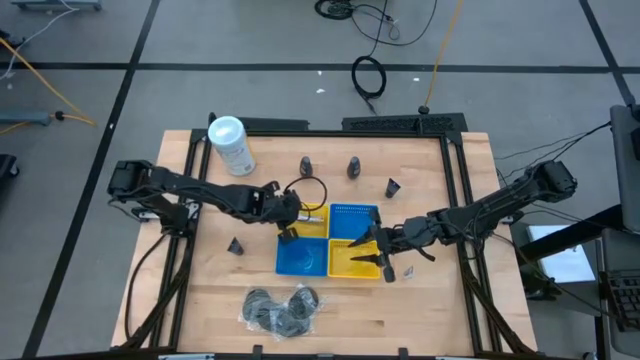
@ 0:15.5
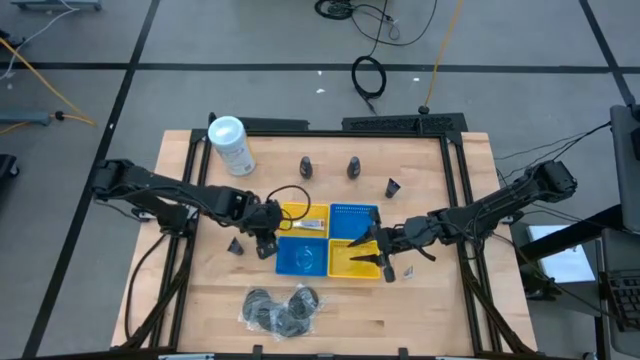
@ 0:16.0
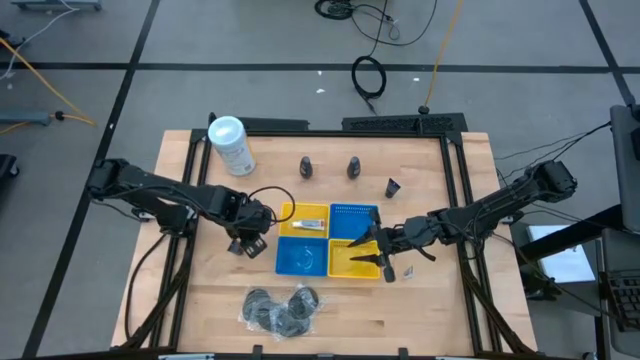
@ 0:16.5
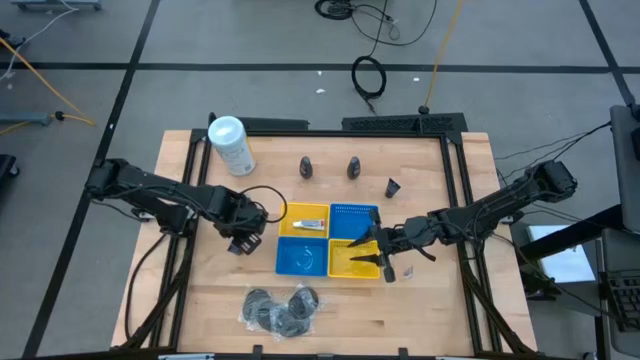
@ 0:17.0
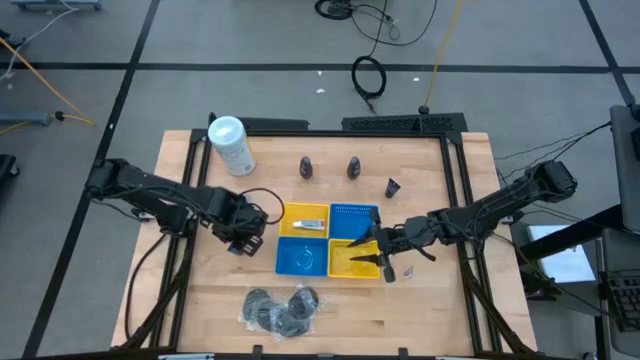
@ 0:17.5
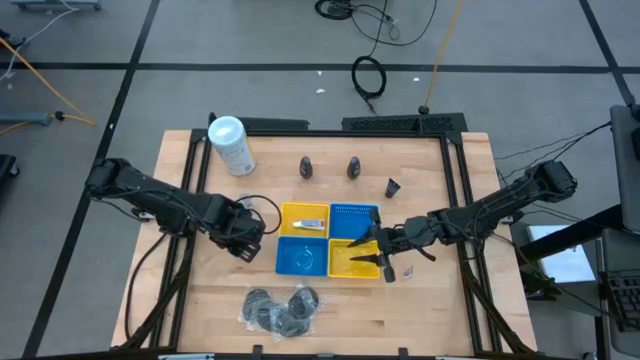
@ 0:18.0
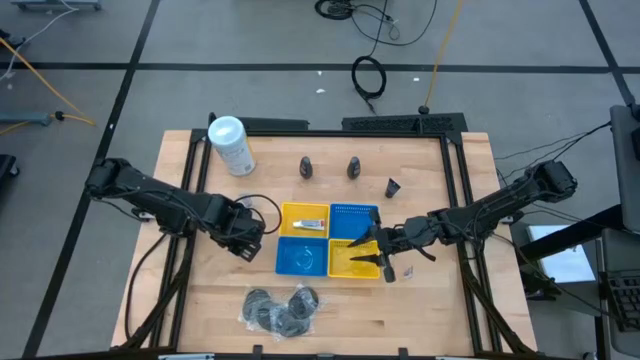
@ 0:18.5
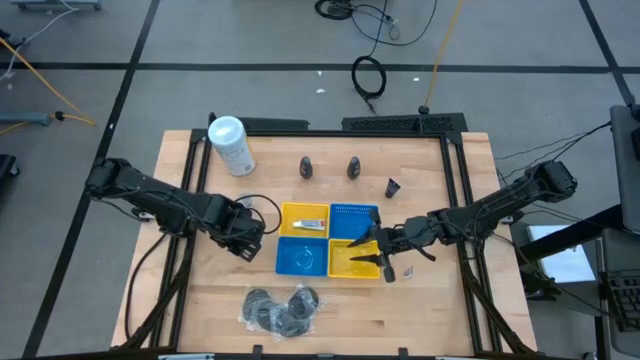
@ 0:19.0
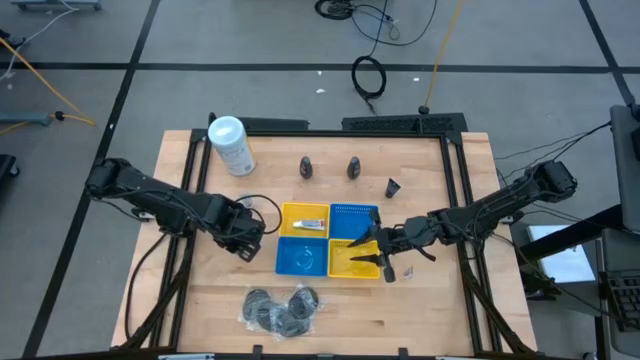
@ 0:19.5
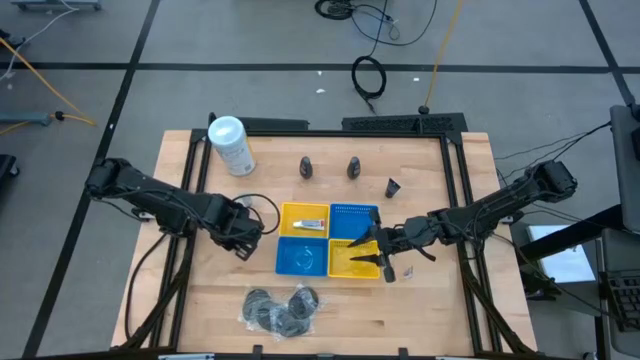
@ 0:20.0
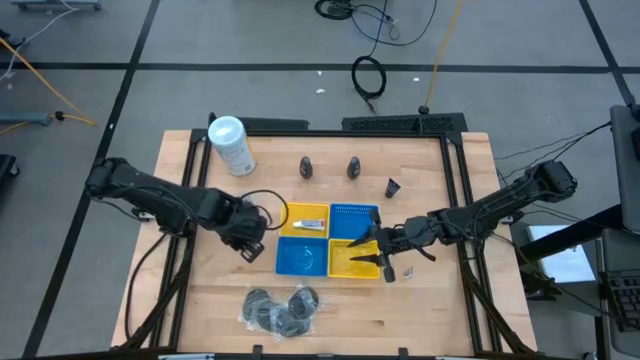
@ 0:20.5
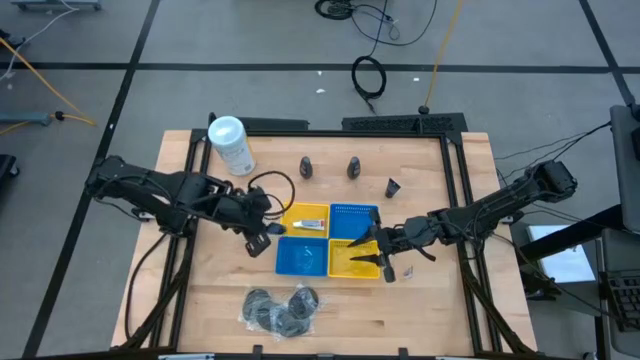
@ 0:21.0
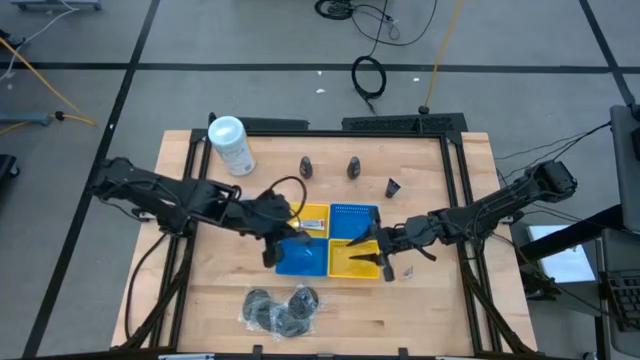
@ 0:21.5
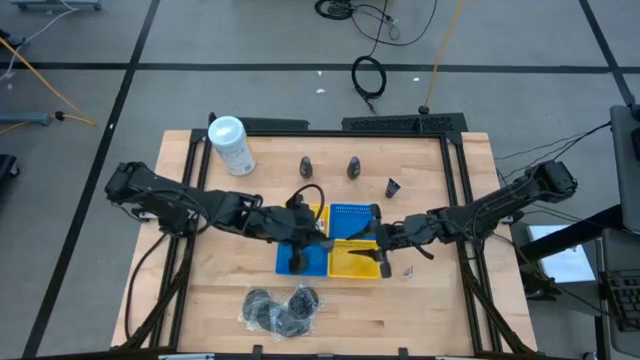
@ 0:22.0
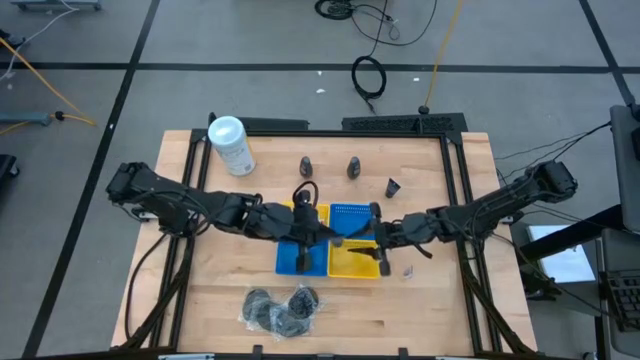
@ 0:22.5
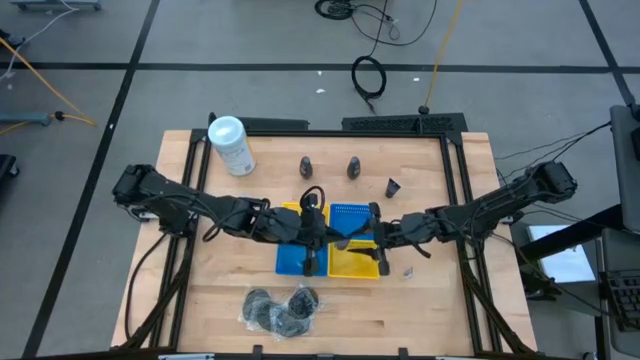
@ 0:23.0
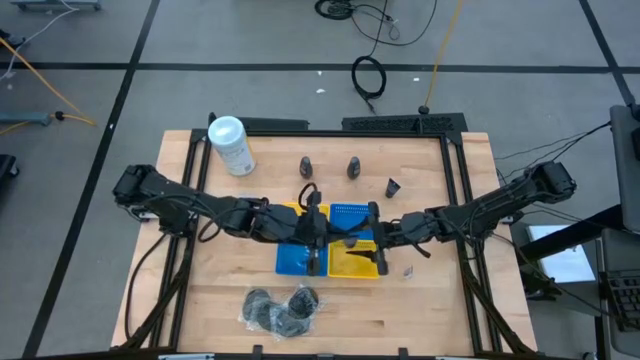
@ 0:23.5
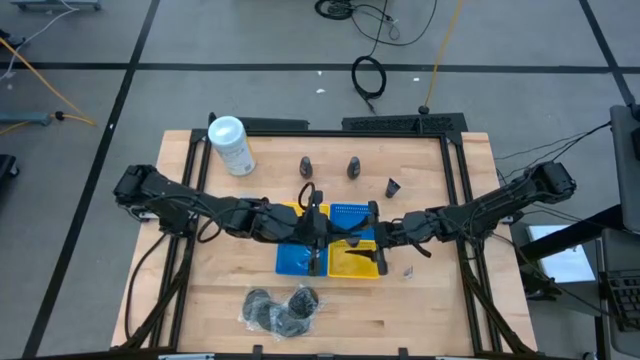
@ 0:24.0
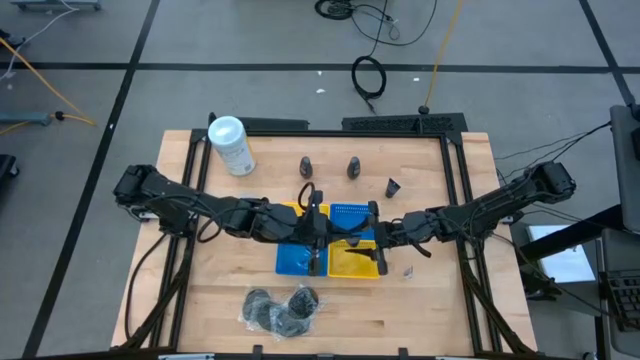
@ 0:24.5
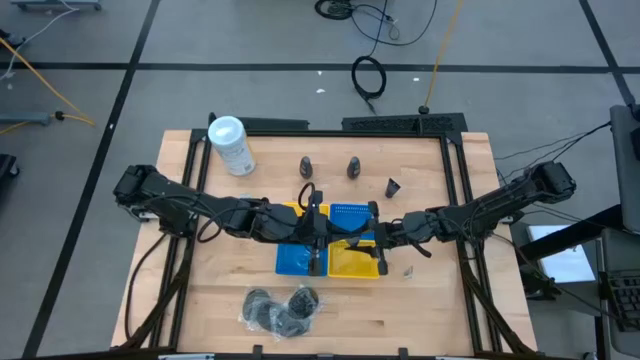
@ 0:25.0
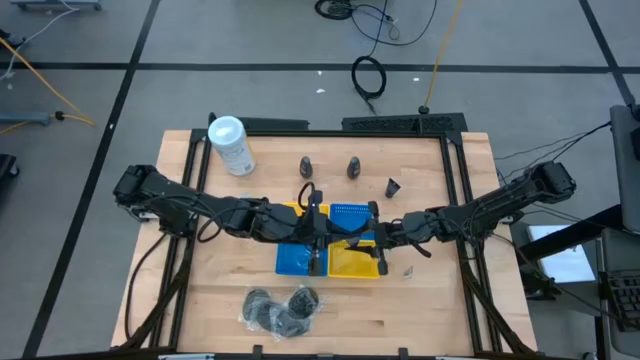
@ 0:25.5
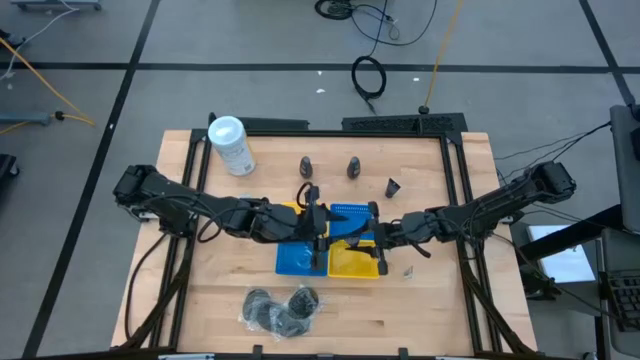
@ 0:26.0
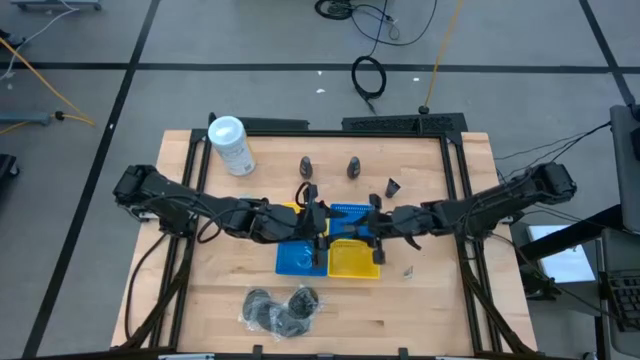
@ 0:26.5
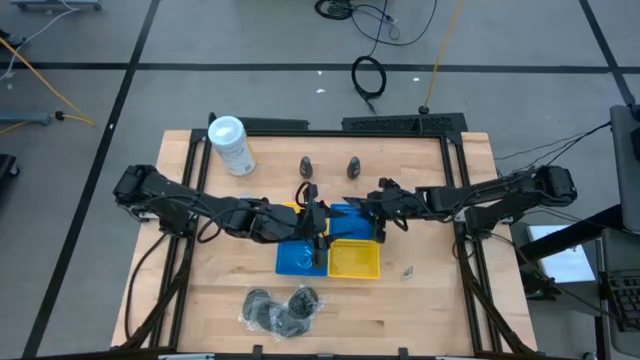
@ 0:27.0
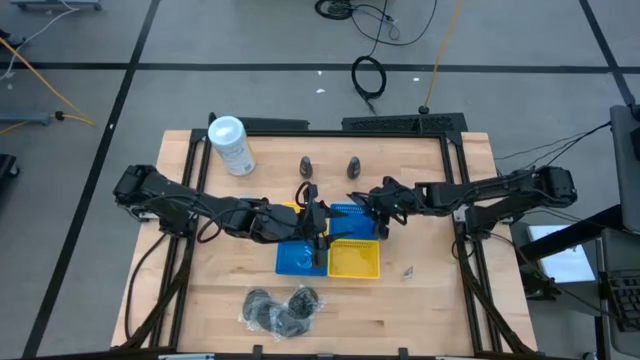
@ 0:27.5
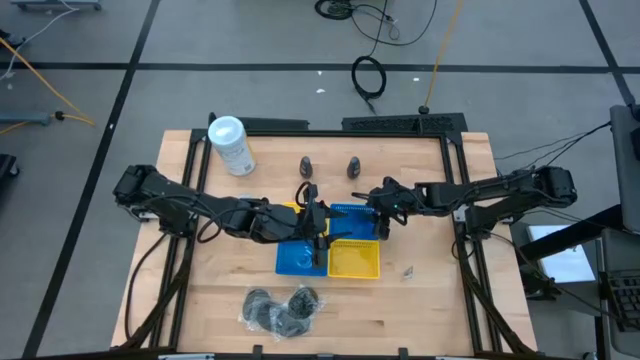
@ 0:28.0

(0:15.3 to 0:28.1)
Task: Pick & Place Travel size toiletries
Put the blue shave cream into the right blue bin

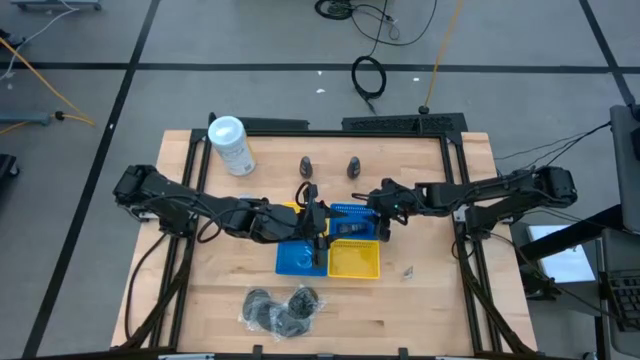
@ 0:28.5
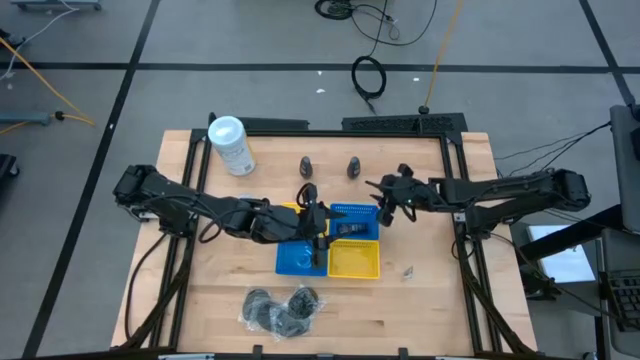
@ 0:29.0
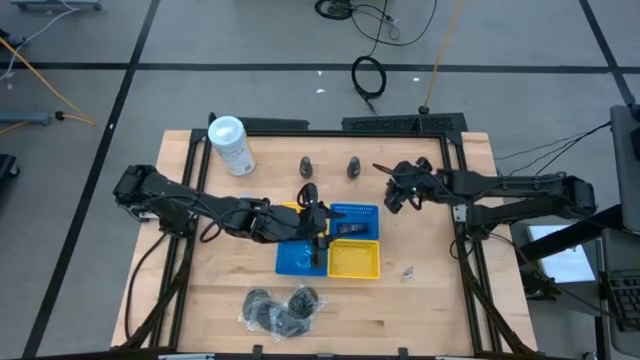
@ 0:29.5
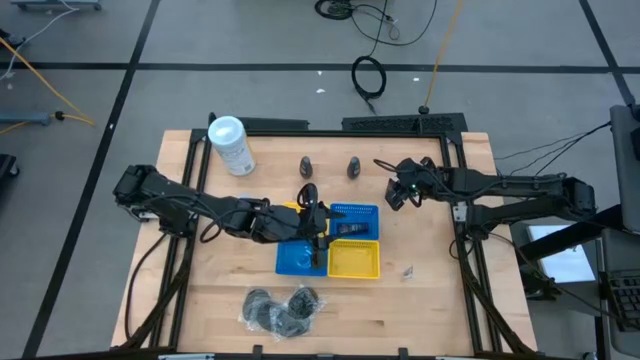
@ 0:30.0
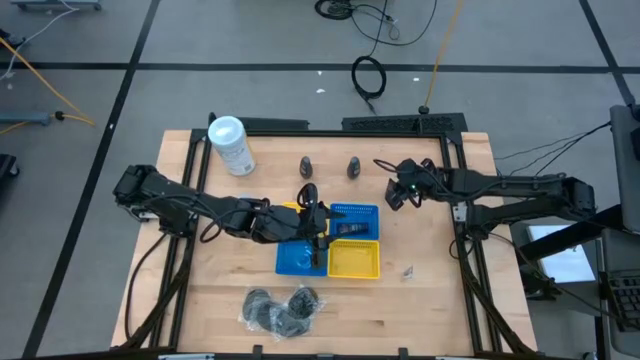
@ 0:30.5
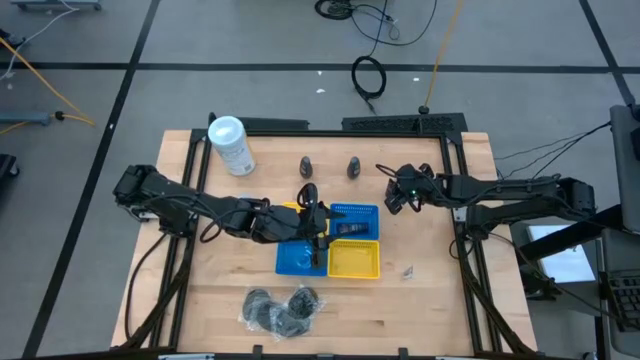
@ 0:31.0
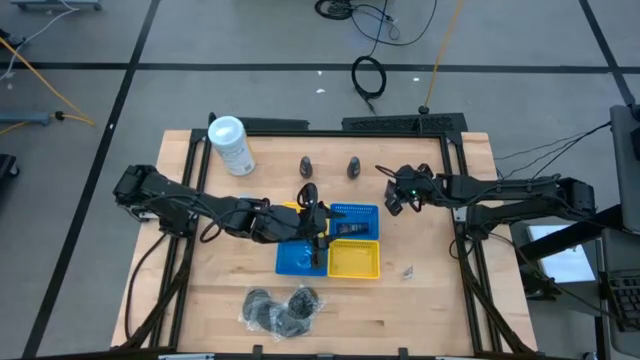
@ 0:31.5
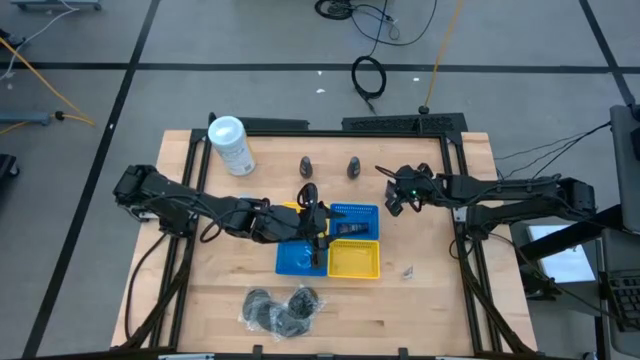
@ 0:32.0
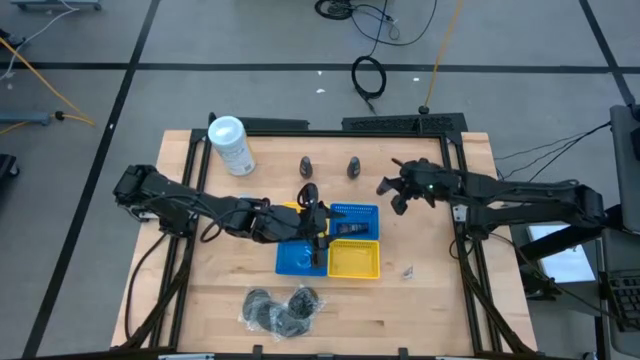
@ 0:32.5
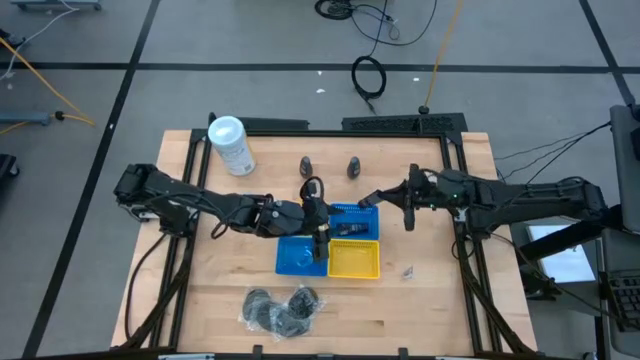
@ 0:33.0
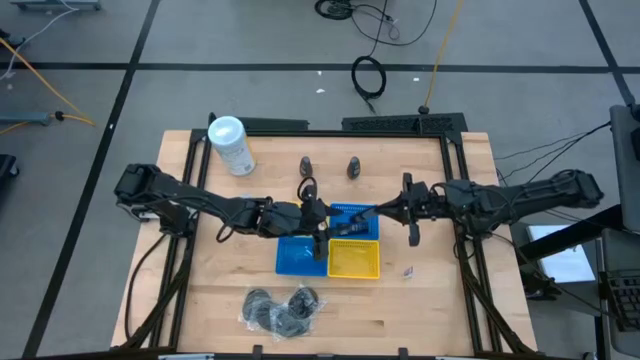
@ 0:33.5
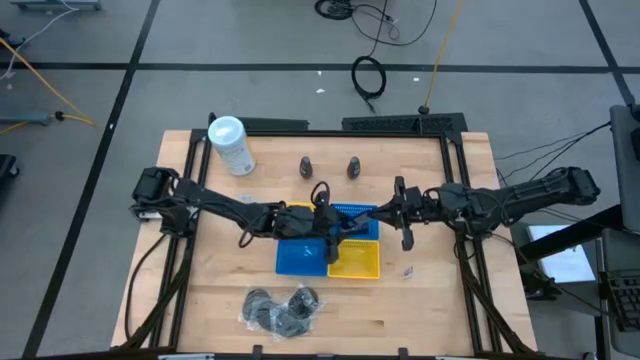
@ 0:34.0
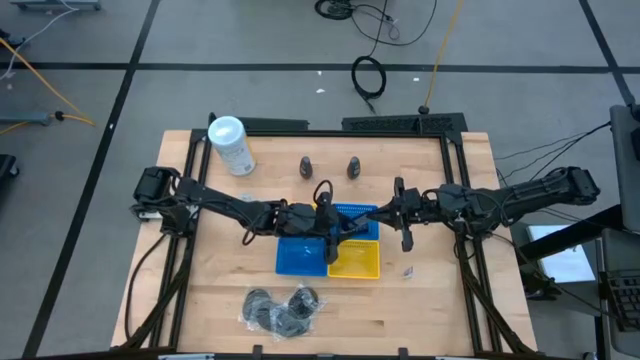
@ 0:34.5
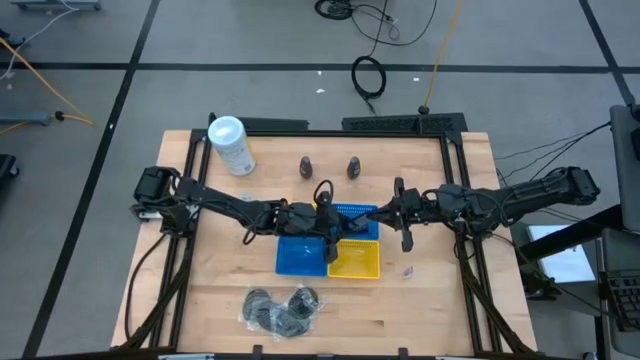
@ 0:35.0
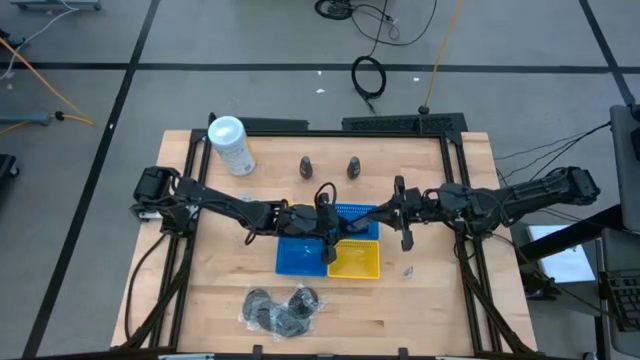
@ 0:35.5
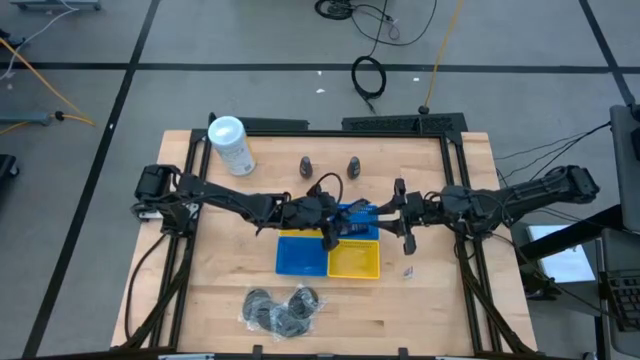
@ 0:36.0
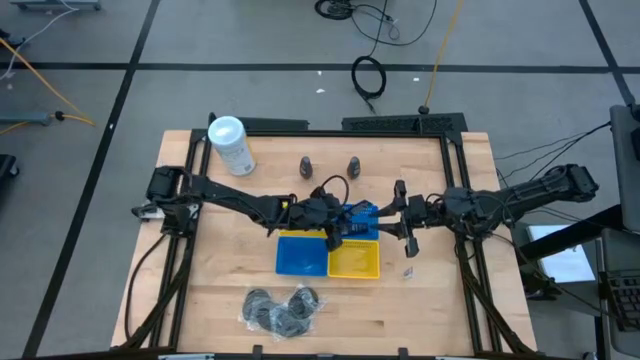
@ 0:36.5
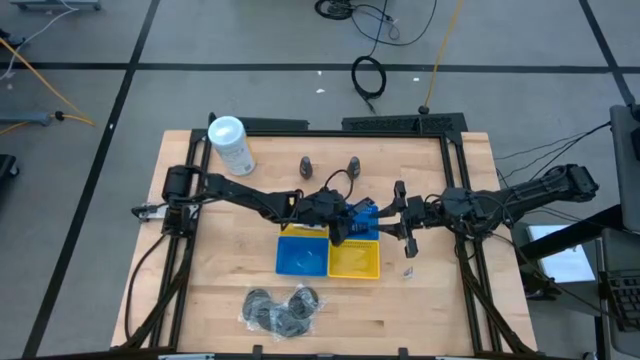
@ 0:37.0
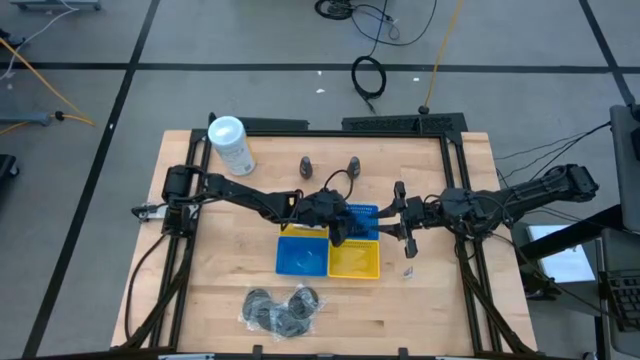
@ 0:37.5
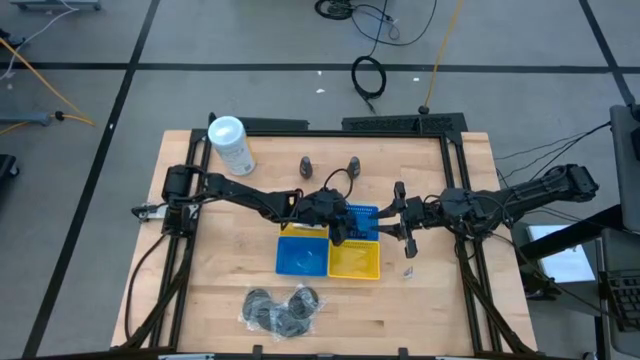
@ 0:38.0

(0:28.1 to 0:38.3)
Put the blue shave cream into the right blue bin
